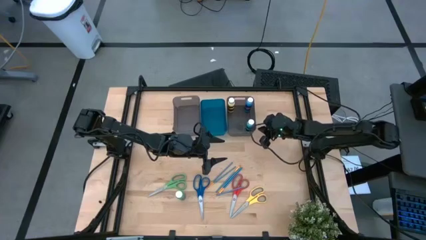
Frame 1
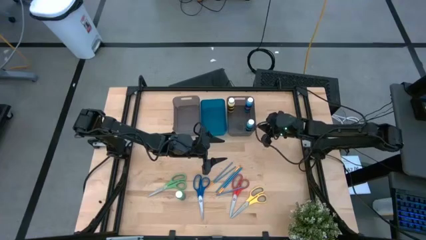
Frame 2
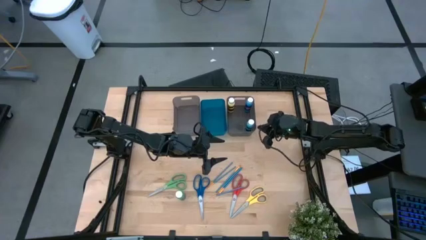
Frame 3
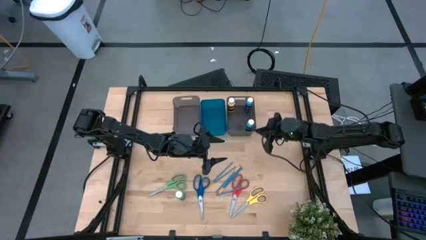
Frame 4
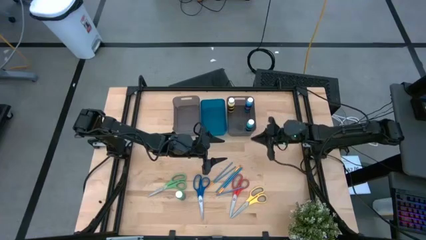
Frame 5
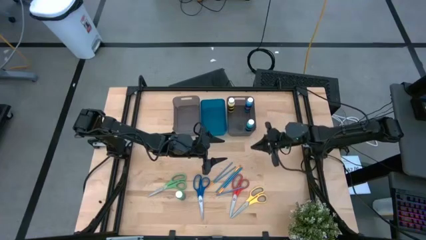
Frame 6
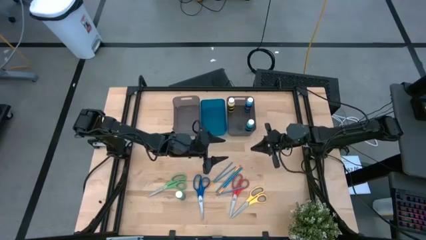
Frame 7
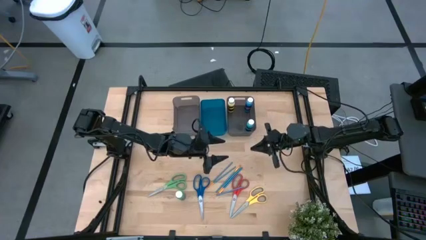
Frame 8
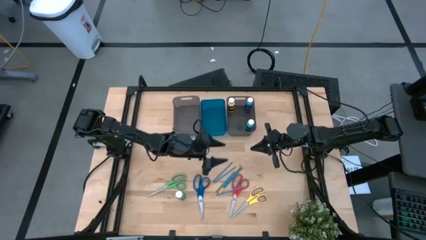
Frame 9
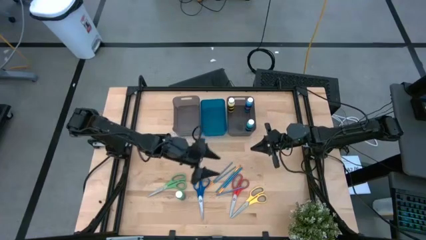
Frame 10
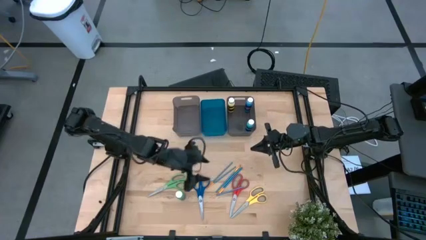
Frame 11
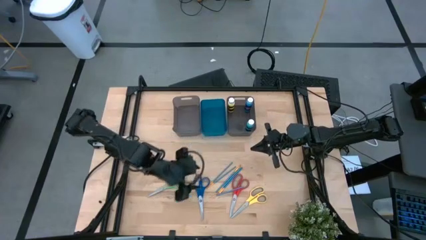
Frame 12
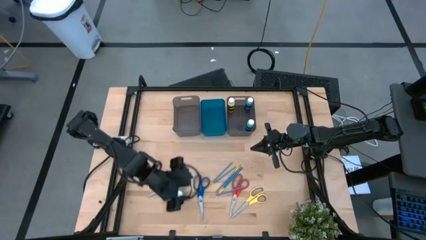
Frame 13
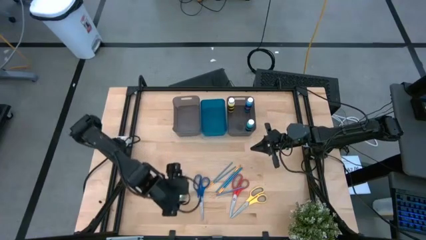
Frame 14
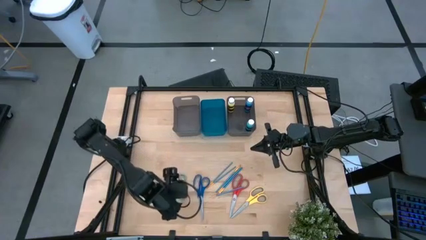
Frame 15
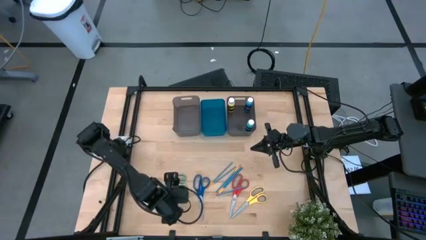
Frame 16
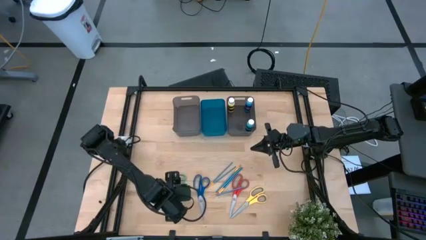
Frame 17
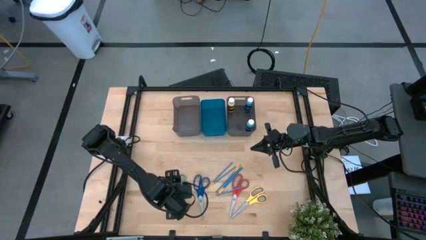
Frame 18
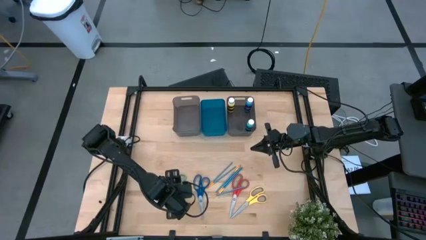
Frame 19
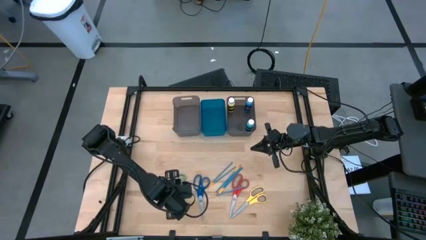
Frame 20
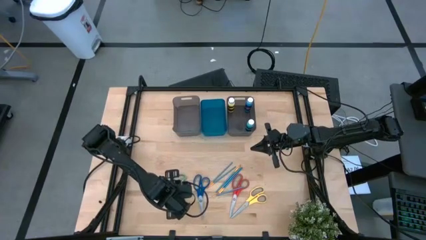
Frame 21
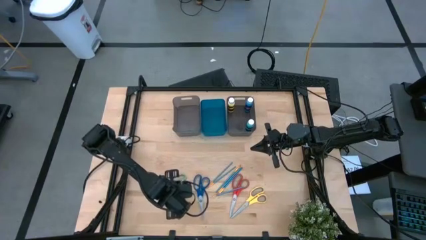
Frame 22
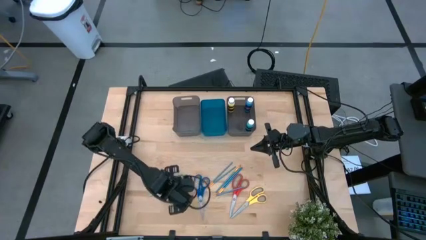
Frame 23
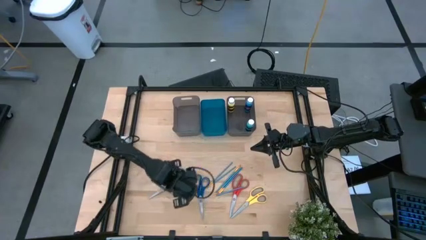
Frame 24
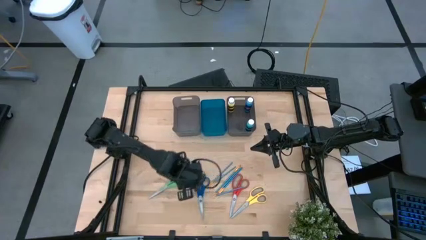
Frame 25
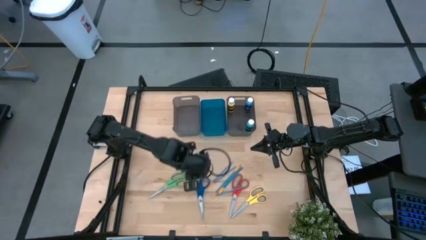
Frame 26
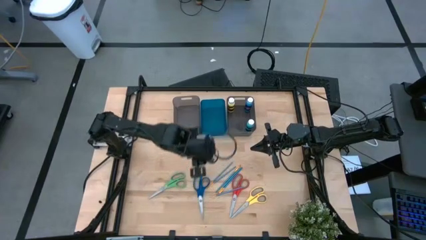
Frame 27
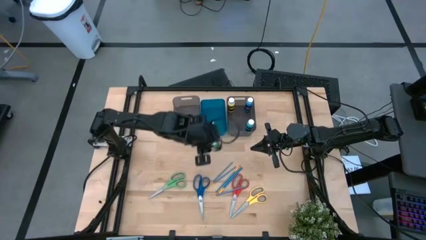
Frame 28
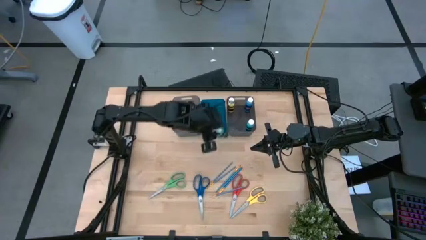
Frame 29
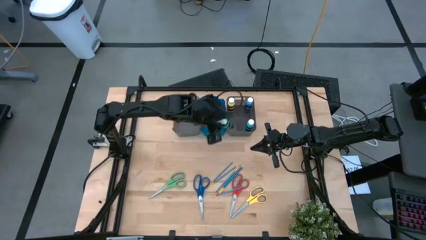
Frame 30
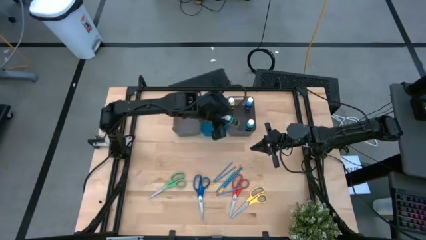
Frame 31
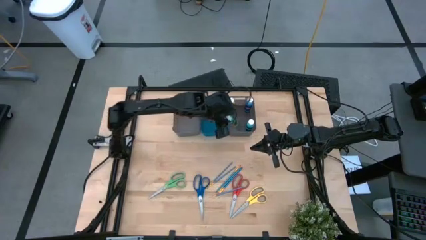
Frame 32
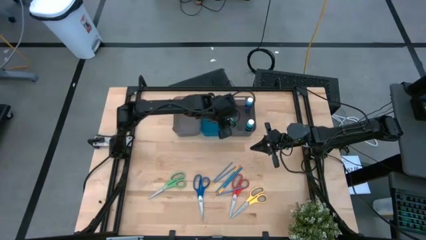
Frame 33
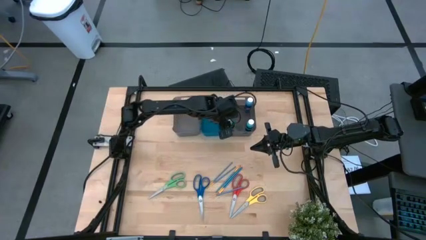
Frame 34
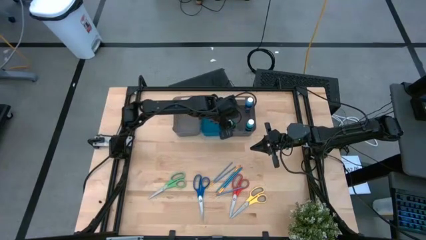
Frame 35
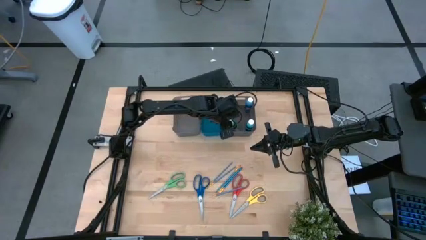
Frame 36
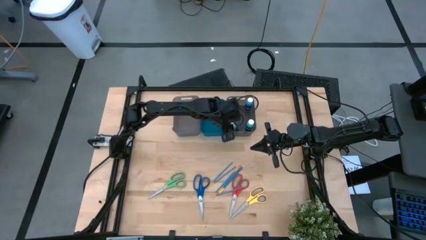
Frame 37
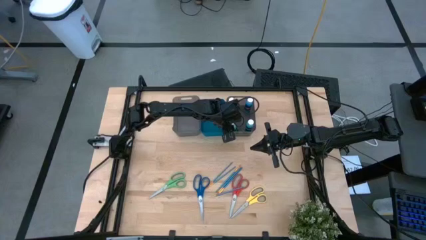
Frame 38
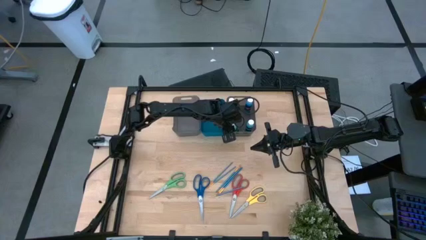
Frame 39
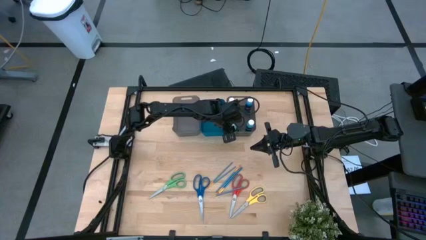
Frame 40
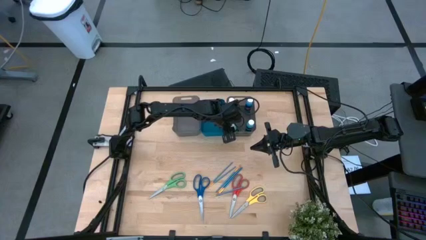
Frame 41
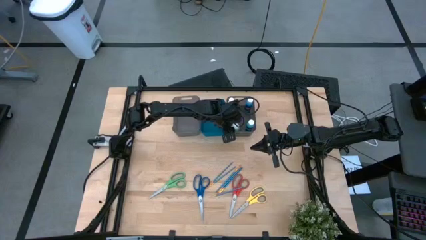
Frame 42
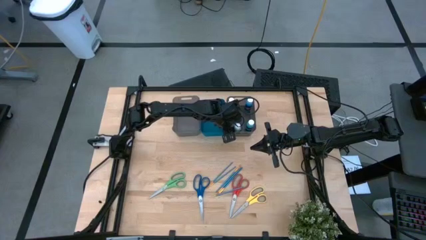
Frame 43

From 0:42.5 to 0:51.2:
Task: Pick & Place Paint Supplies
Put the green coloring bottle into the right gray bin

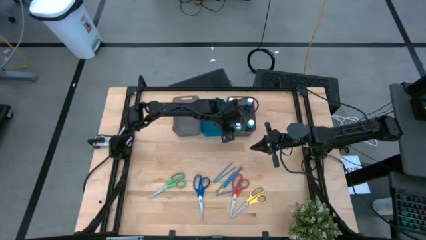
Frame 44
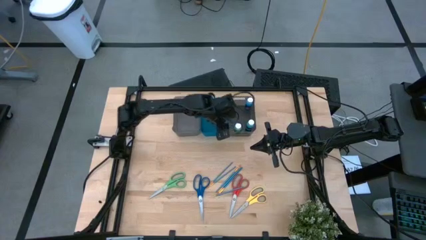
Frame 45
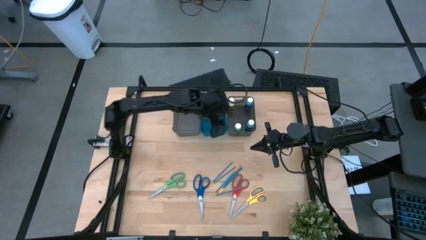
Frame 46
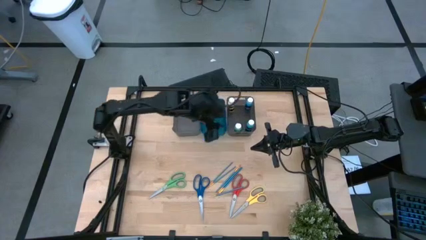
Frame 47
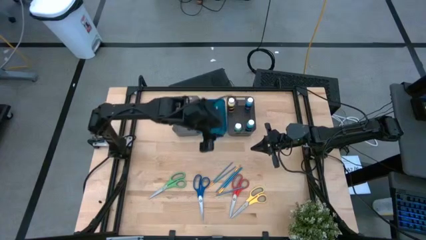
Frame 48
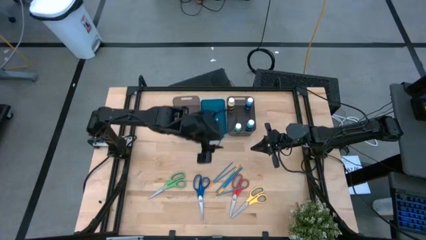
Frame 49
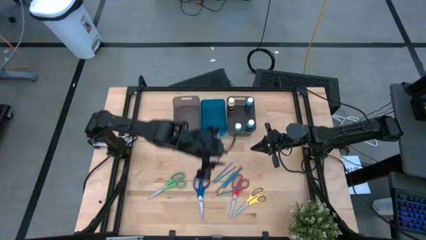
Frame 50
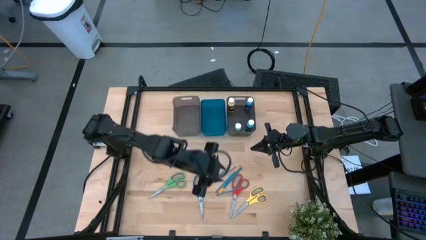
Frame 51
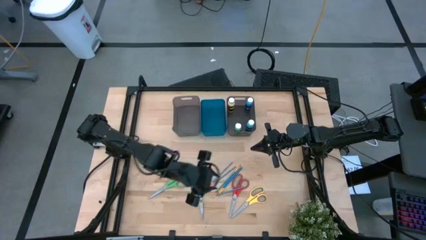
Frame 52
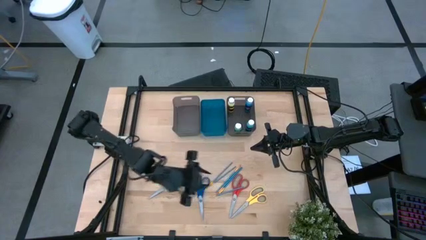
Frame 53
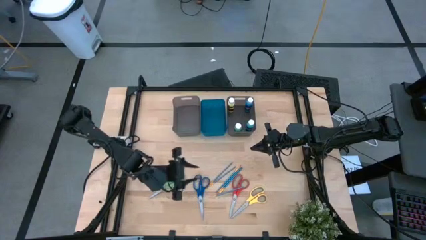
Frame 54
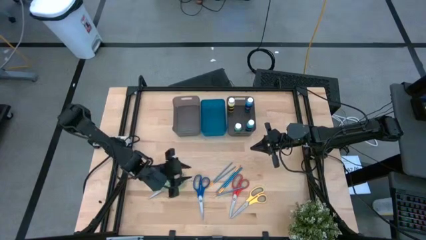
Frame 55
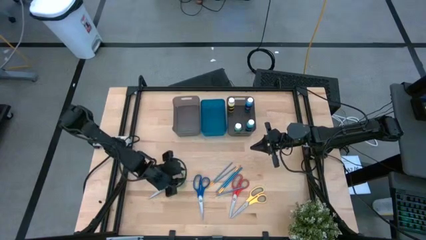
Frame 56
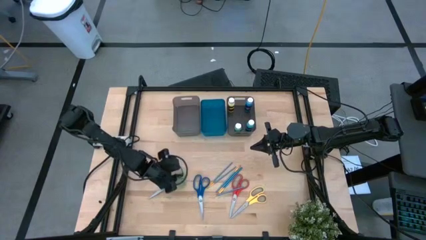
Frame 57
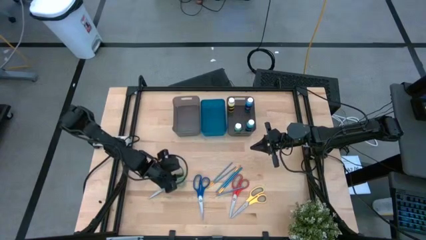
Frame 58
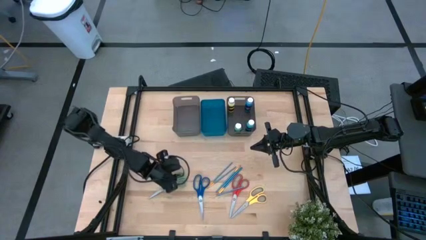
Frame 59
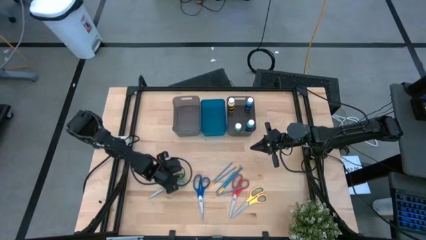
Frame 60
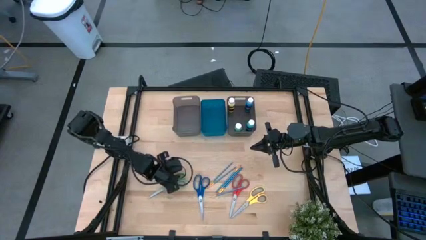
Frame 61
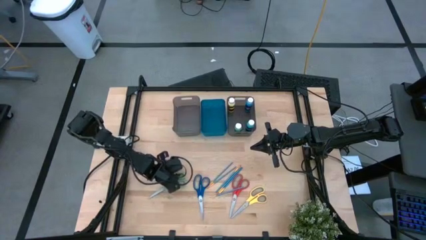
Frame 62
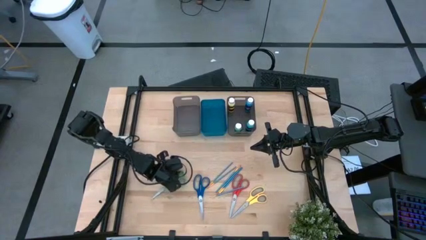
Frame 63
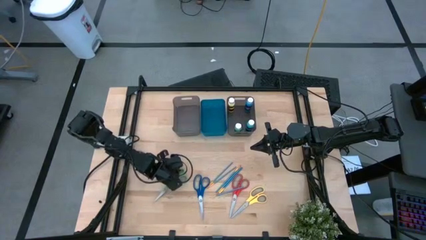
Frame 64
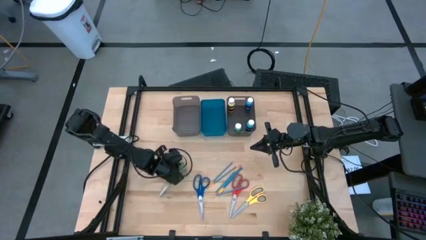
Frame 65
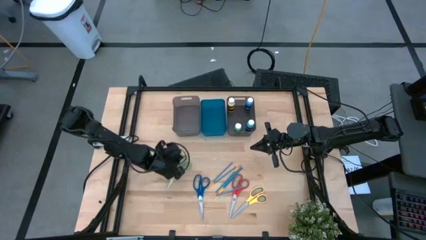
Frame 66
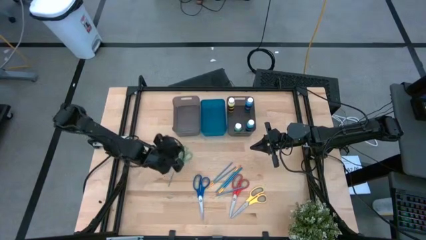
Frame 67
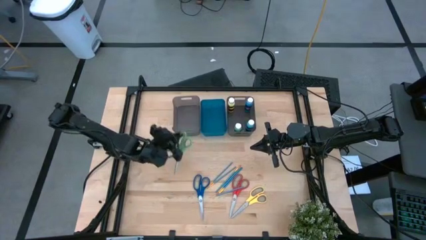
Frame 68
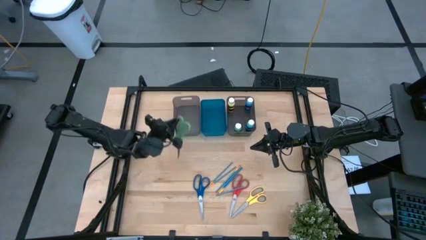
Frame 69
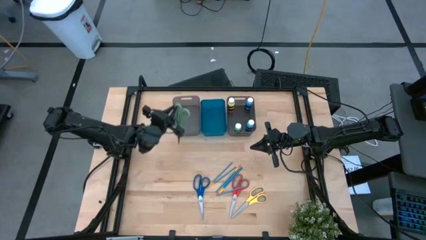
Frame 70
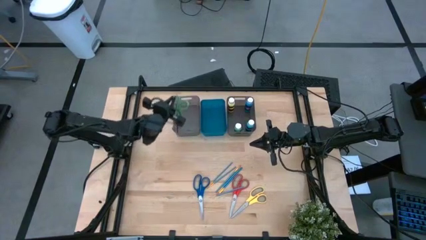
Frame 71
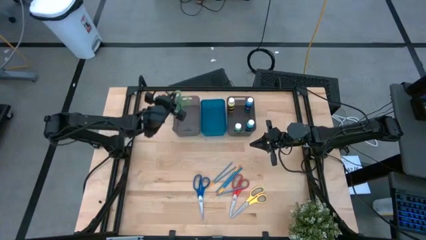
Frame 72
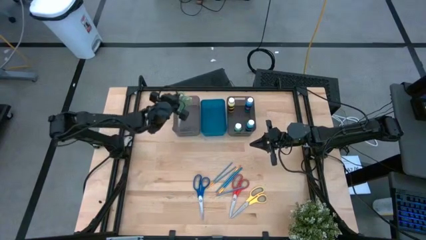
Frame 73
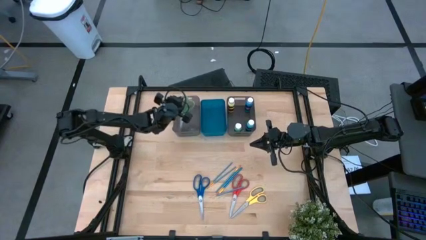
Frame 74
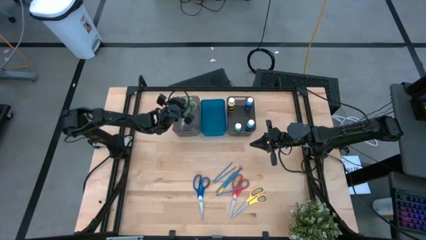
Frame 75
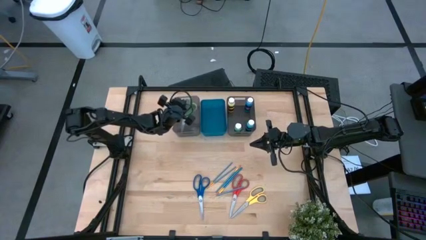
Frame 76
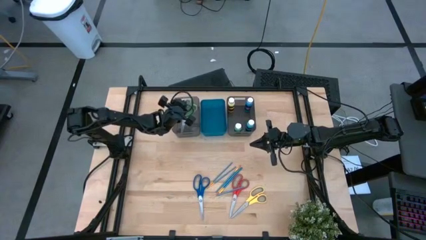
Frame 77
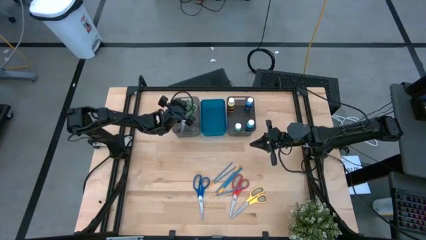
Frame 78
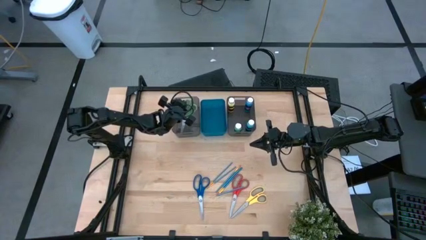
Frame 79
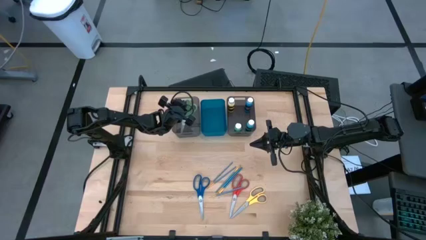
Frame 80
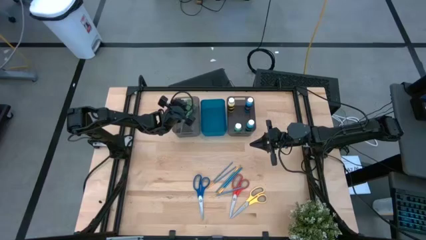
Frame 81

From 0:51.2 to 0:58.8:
Put the green scissors into the left gray bin

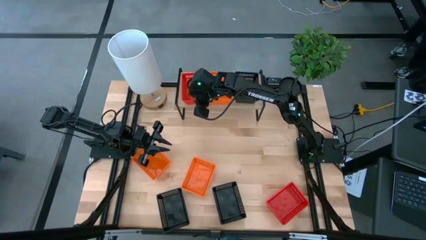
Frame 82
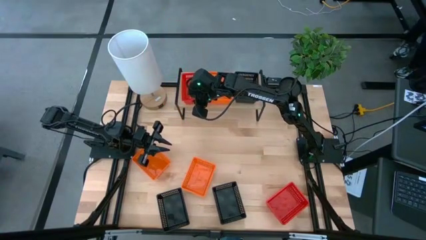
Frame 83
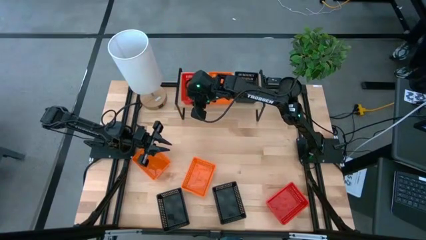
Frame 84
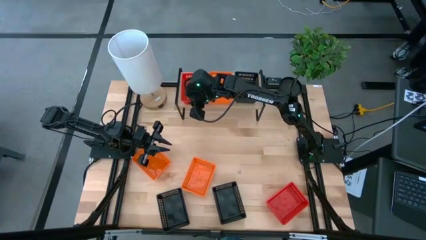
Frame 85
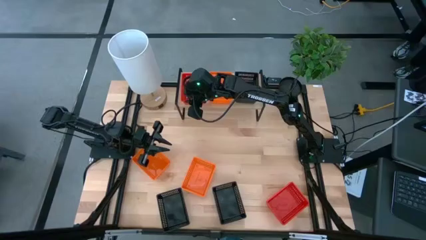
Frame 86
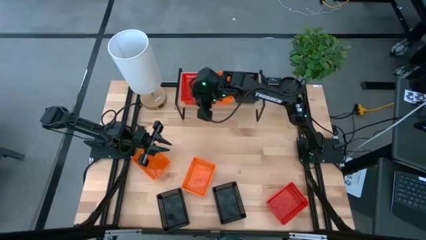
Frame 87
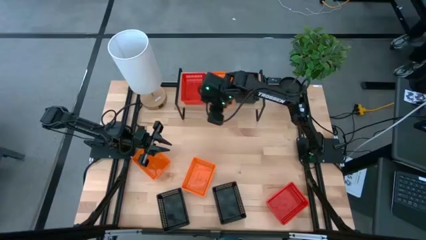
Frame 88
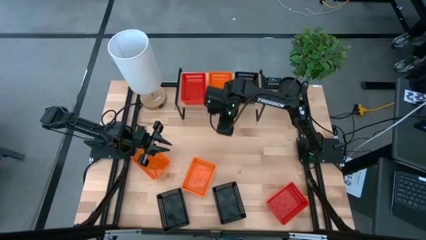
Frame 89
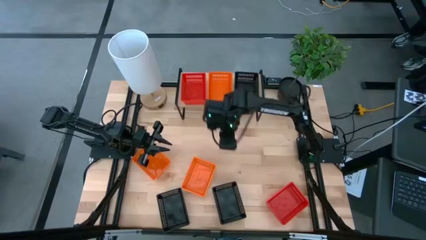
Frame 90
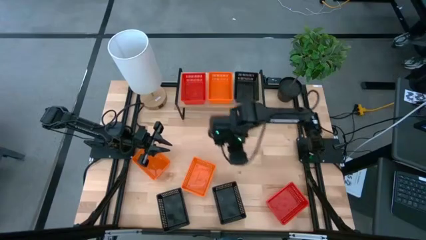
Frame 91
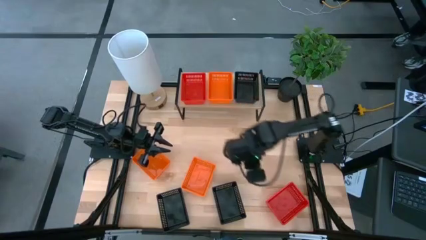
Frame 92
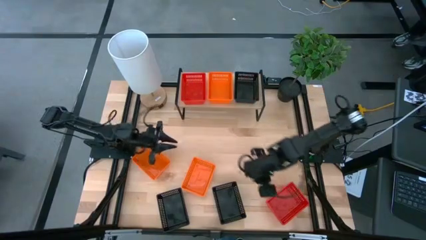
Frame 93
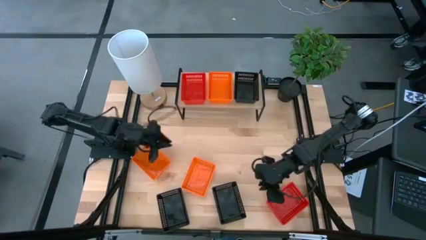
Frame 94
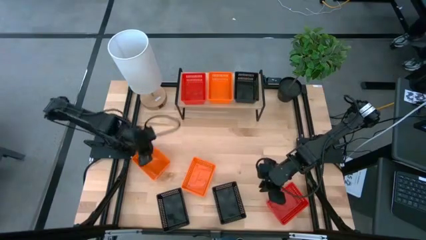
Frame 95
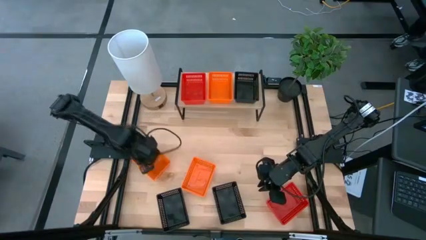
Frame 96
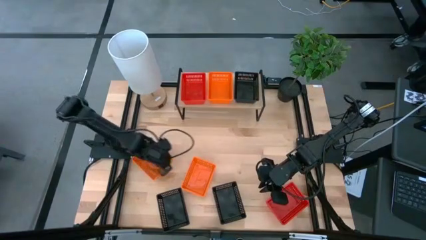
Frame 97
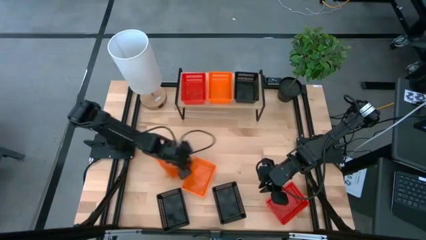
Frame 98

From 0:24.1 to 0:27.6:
Task: Stack baskets on shelf by color
Move the left orange basket to the center of the table
